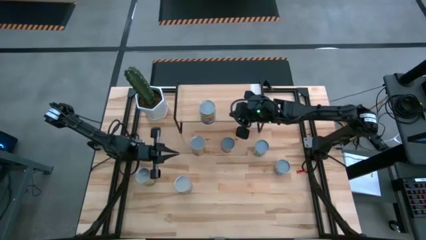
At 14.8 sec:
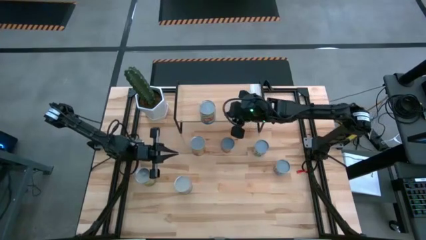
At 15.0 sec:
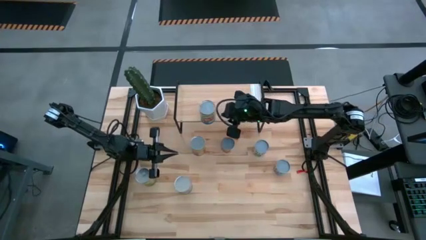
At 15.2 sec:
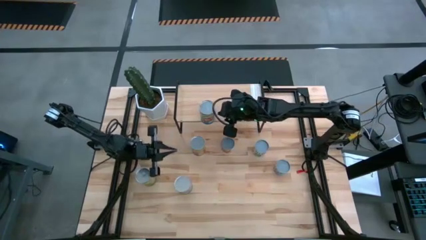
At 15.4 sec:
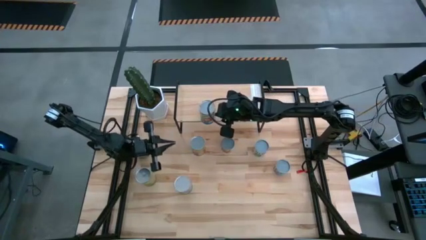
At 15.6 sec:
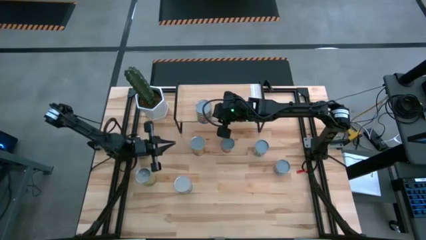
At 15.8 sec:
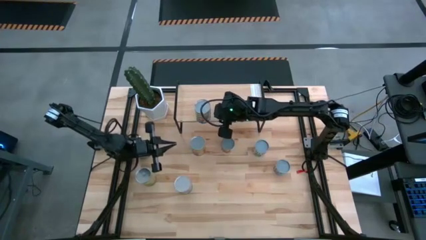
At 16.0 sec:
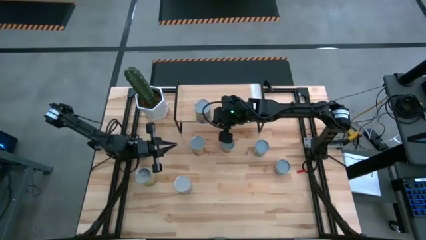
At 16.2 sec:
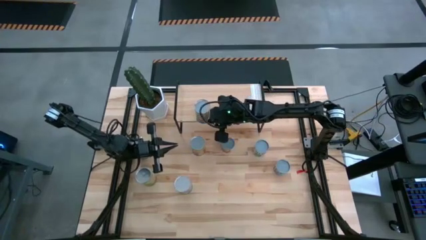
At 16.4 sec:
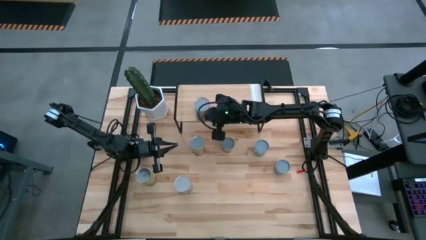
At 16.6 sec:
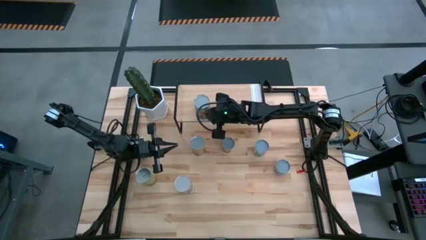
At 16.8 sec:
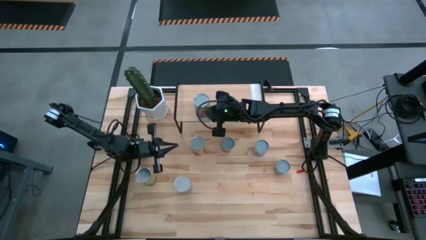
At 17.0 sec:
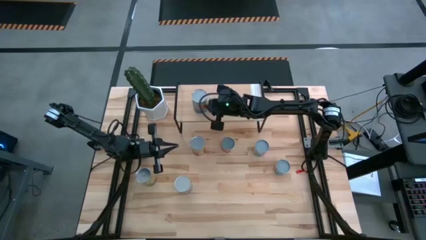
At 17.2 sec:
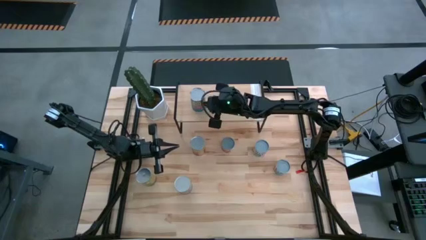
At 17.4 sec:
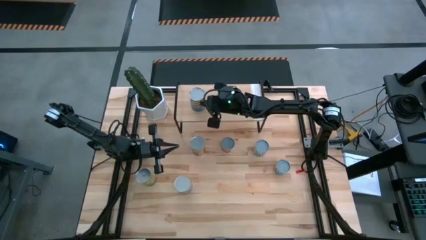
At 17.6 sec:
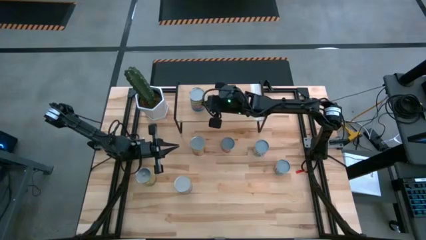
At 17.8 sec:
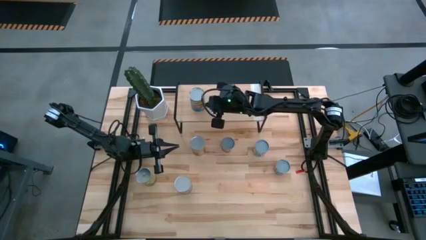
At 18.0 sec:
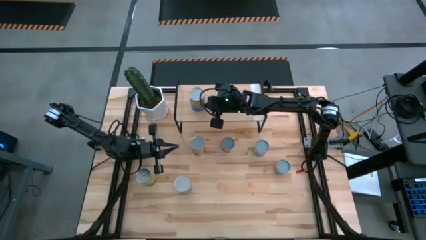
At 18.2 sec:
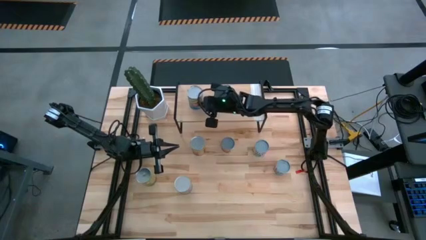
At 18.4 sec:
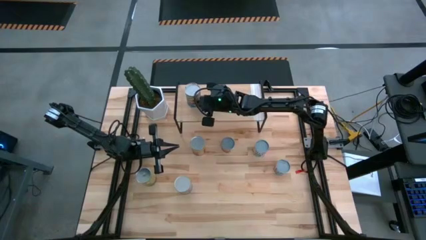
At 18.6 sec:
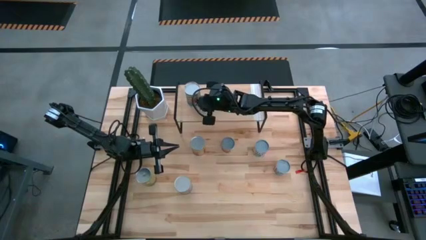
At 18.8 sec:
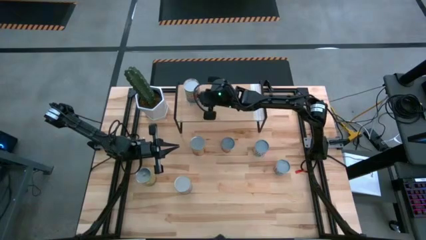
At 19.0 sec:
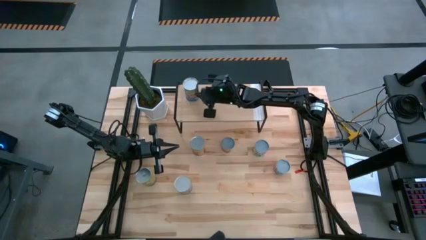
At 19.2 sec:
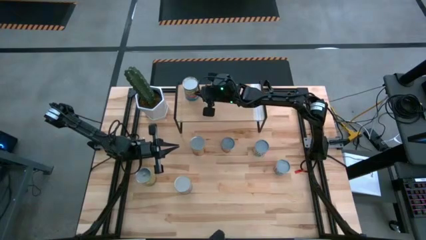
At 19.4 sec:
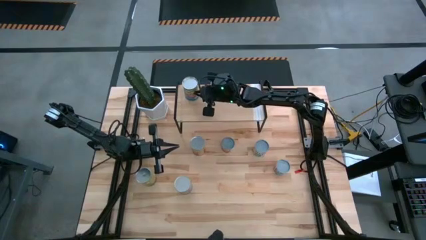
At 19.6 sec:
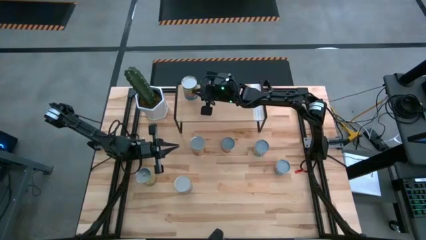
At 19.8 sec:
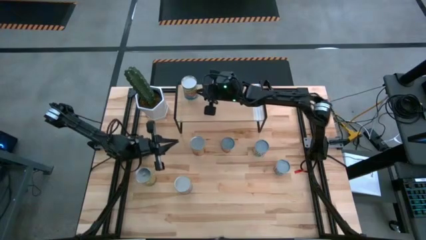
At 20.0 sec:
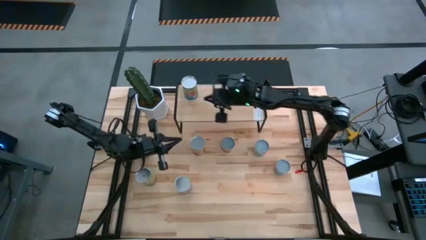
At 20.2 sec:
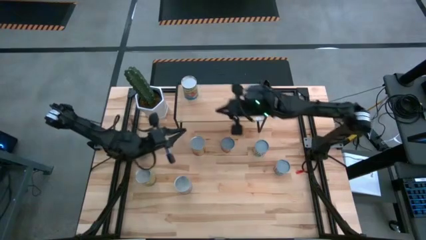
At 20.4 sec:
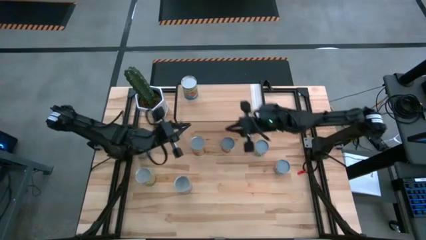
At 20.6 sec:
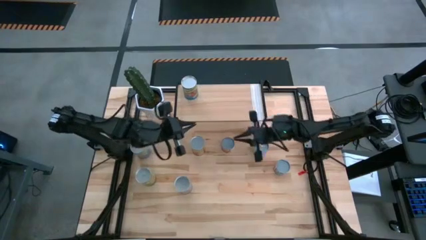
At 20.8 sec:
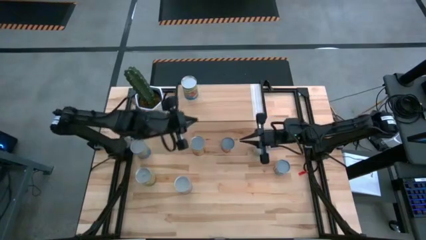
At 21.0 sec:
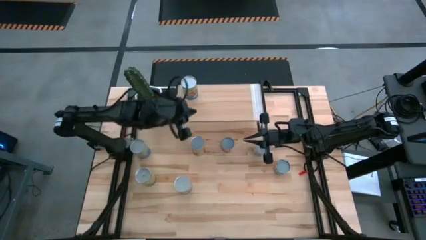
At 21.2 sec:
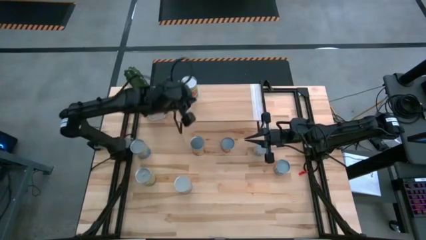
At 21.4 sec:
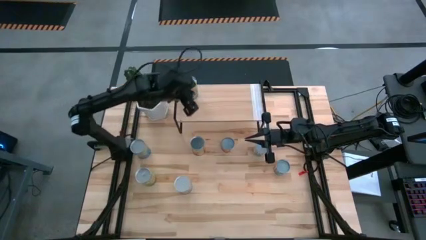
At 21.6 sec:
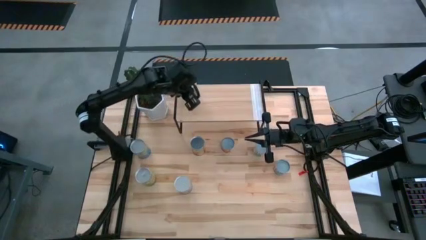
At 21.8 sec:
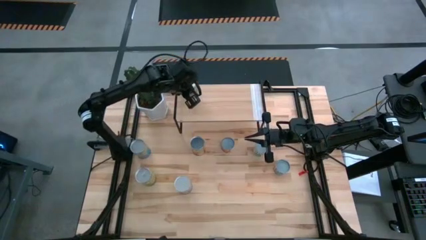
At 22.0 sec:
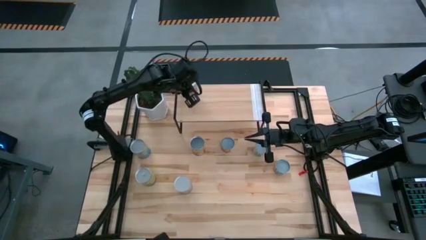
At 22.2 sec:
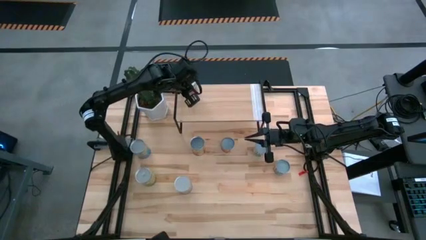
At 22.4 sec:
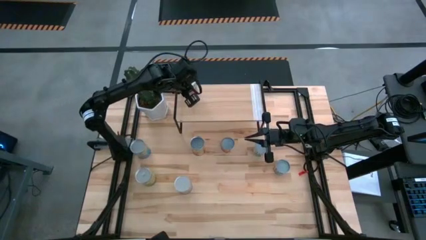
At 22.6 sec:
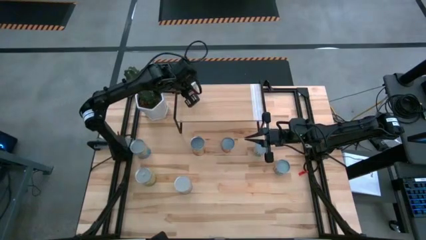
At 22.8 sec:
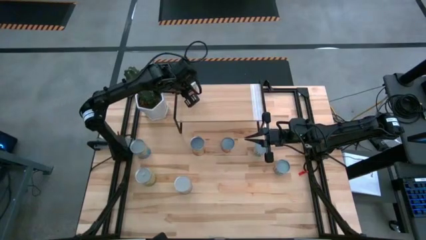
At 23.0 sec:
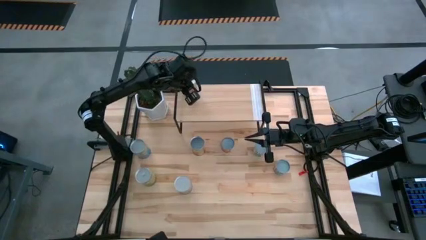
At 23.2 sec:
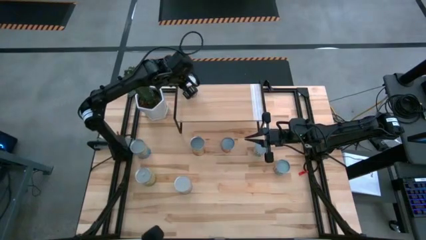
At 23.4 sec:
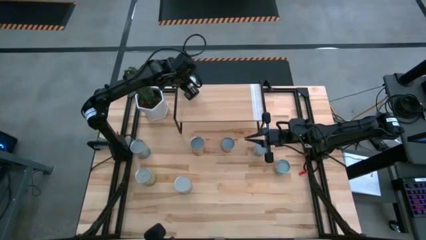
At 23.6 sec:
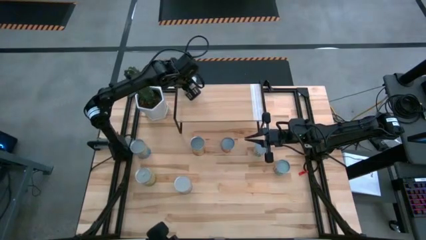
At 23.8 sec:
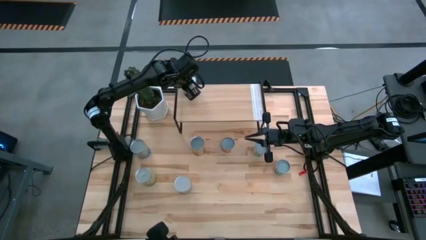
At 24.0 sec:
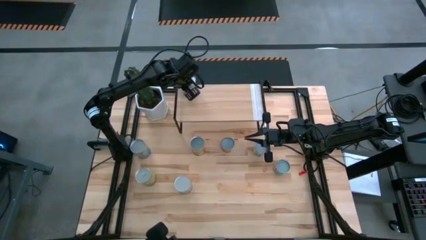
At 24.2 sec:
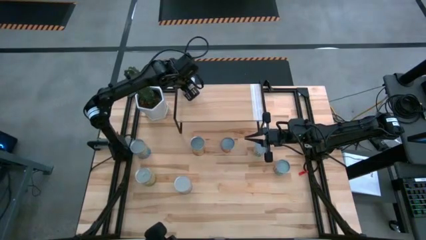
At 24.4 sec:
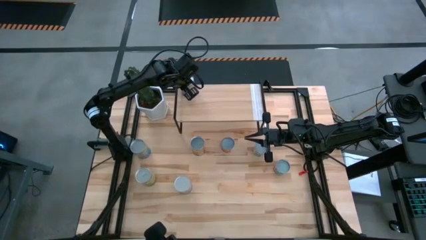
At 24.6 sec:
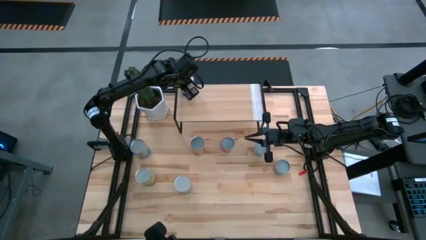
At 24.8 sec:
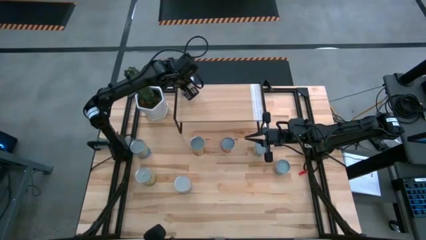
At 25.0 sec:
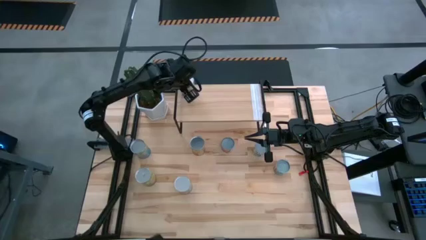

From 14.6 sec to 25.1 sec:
Task: Pick and place cans onto a shelf
Put the canned tomatoes on the shelf

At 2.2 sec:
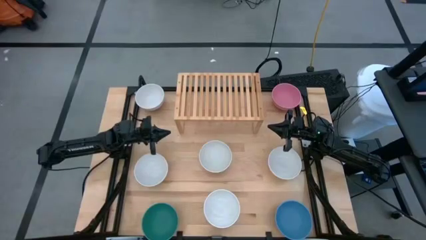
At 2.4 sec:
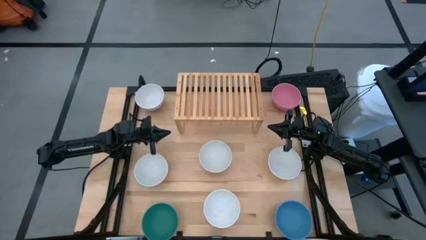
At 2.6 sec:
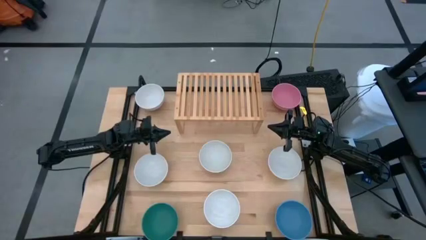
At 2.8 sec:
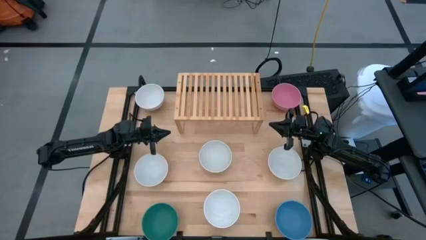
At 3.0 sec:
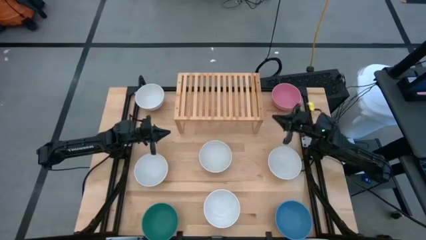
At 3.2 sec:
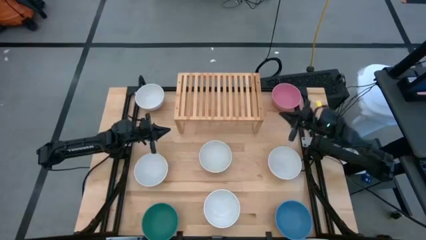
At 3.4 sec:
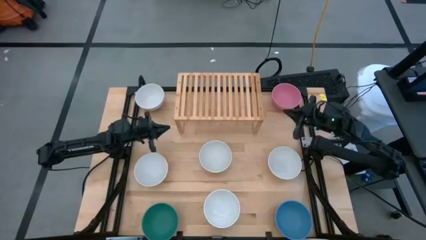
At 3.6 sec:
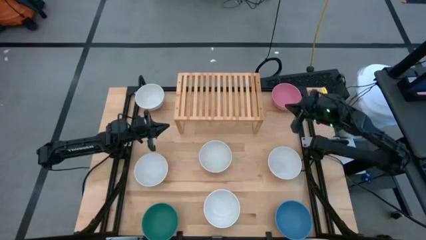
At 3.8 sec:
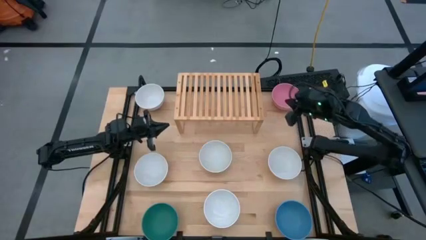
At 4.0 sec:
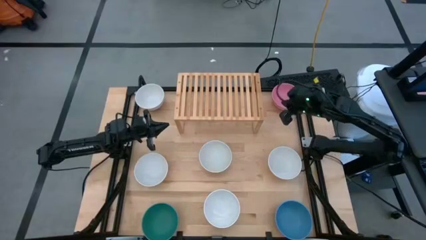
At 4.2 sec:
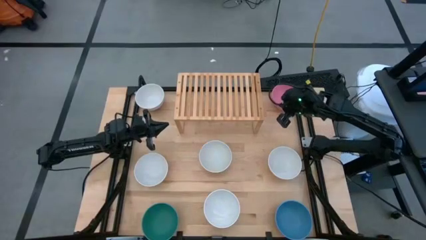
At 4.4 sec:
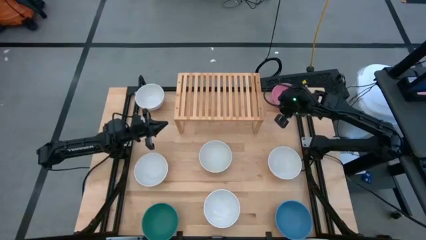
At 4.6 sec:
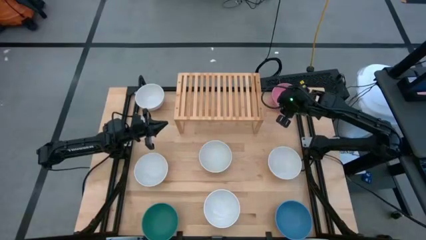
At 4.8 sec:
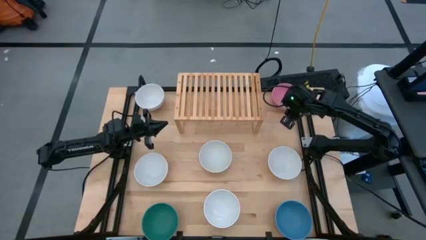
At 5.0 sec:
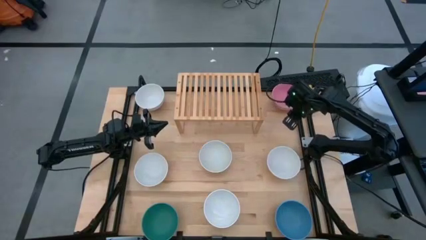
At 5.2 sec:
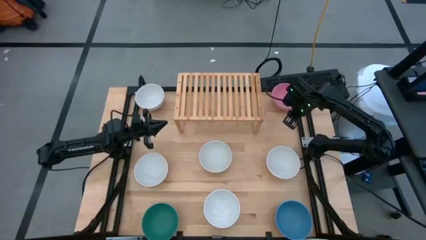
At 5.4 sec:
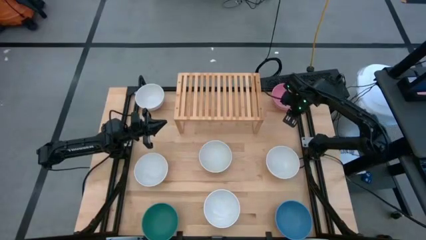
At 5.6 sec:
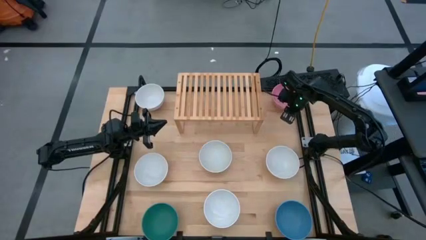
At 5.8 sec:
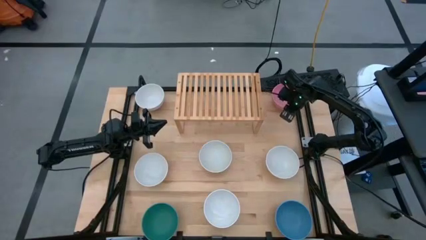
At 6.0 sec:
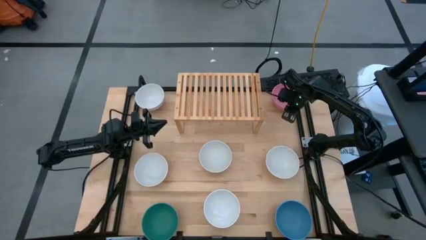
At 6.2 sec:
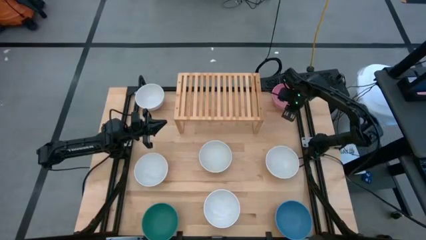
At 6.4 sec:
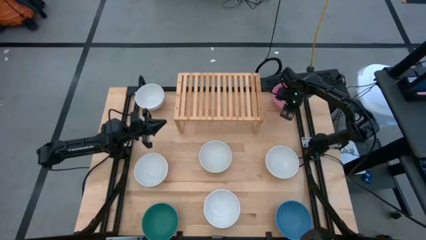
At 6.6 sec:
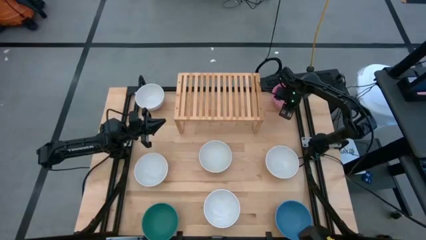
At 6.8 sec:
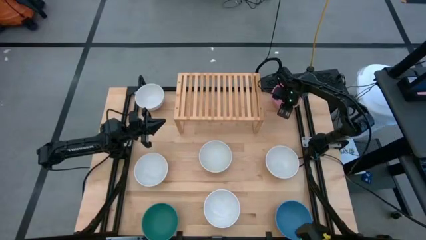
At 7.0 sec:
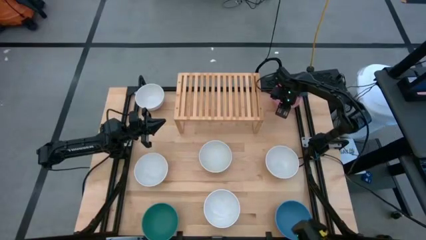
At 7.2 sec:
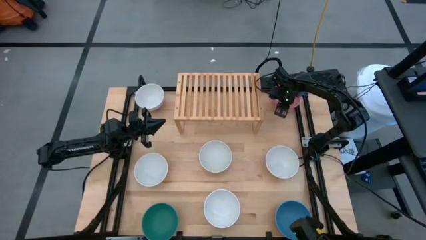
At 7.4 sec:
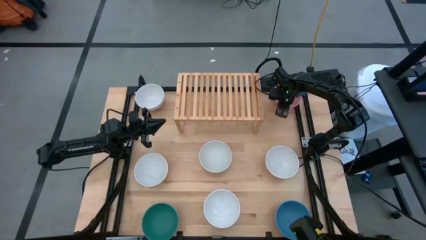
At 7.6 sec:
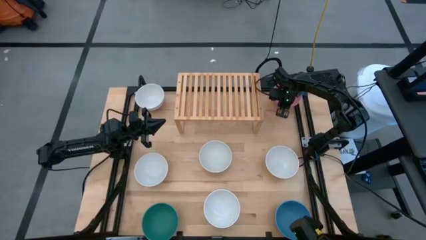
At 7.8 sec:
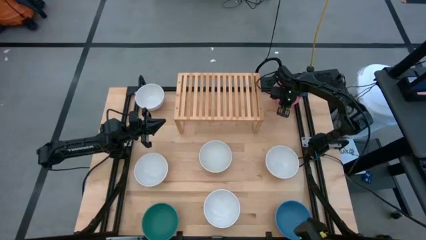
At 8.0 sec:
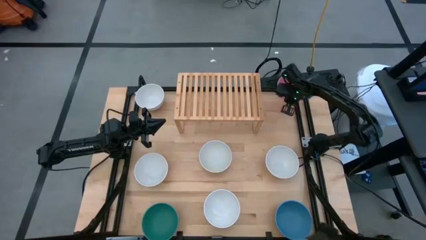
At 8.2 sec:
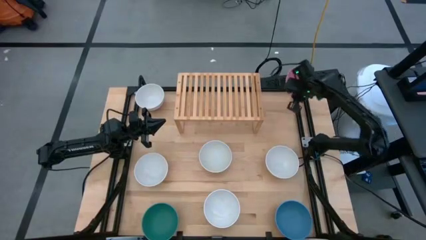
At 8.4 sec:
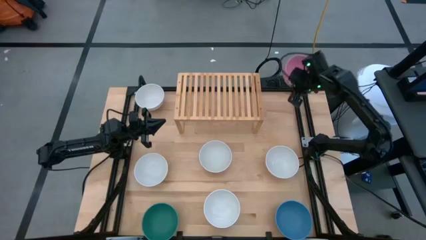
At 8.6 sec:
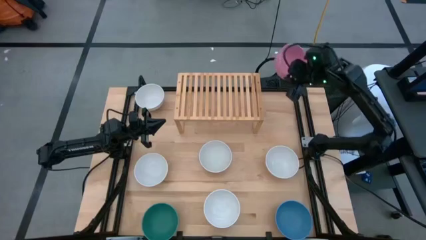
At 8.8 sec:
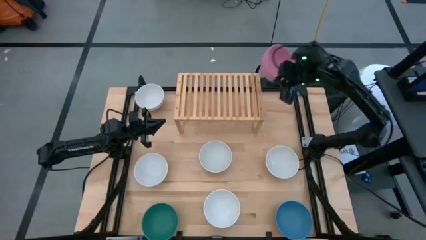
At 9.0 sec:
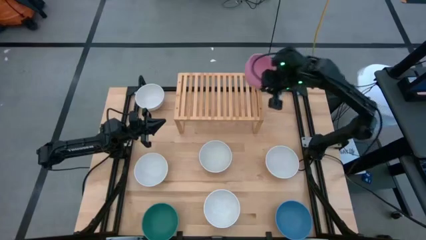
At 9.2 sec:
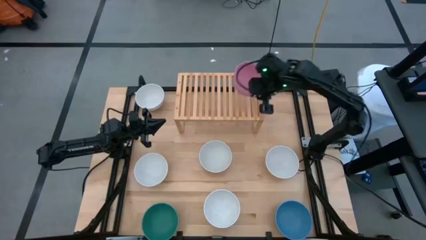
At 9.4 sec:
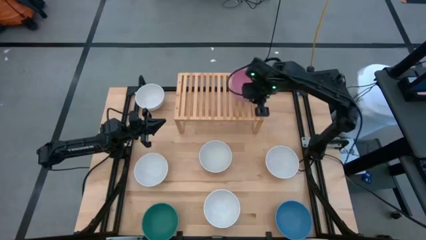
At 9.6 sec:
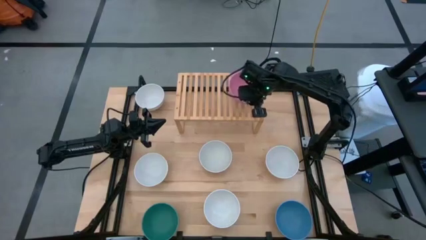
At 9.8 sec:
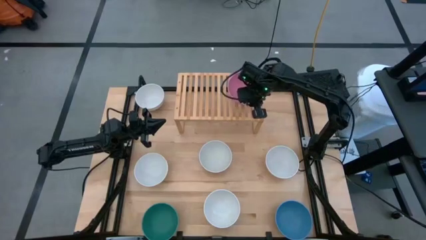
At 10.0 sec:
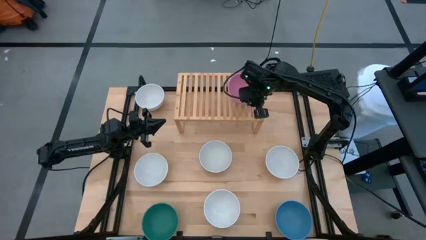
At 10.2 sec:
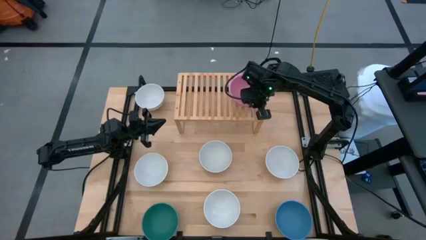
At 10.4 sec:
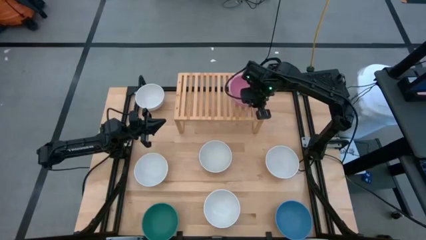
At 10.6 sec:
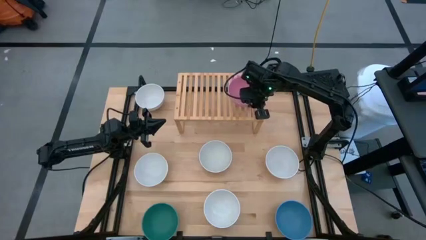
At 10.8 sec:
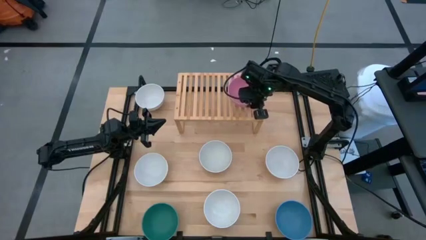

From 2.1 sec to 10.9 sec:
Task: Place and stack bowls onto a shelf
Put the pink bowl on the shelf
